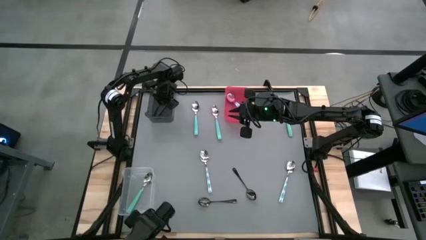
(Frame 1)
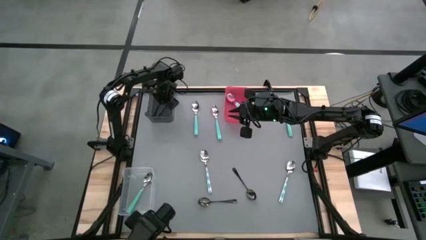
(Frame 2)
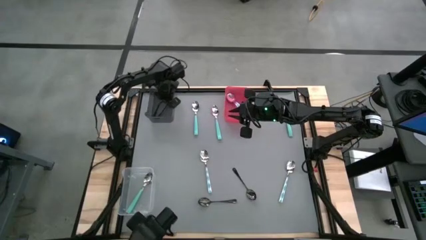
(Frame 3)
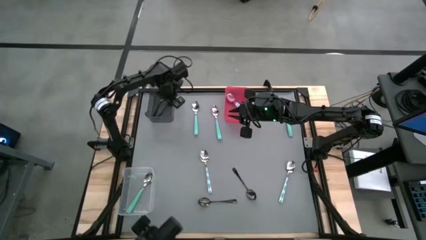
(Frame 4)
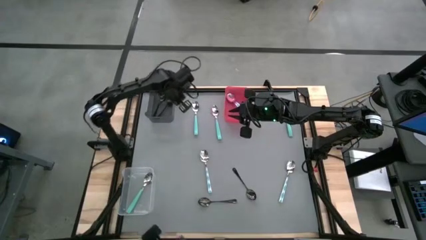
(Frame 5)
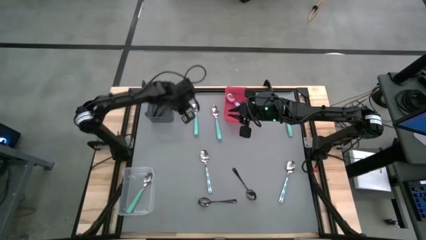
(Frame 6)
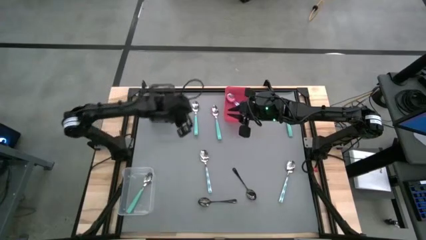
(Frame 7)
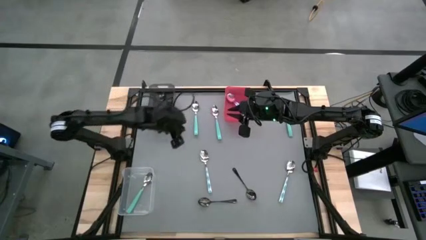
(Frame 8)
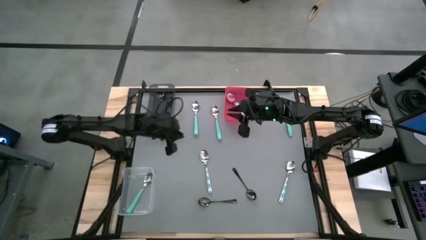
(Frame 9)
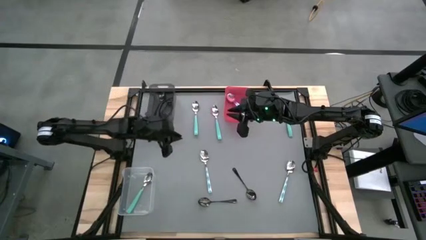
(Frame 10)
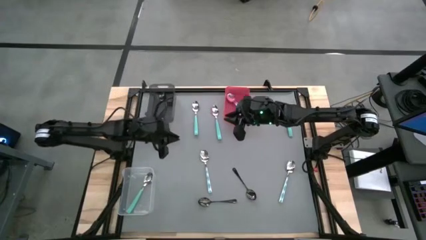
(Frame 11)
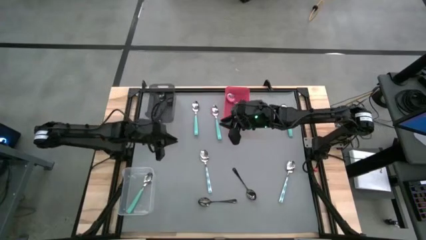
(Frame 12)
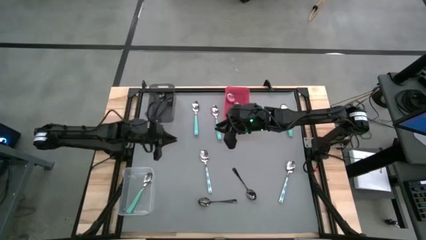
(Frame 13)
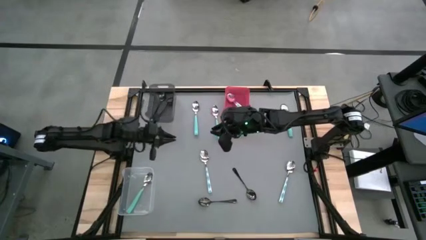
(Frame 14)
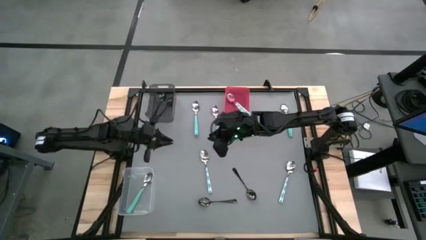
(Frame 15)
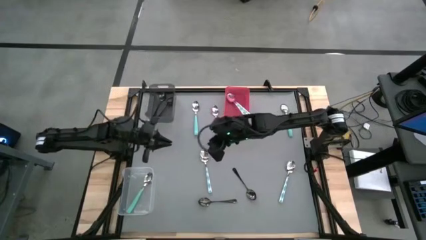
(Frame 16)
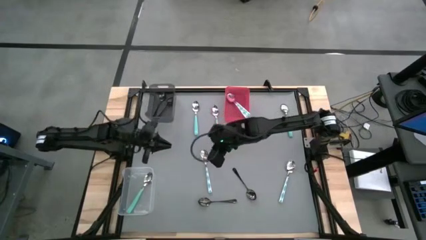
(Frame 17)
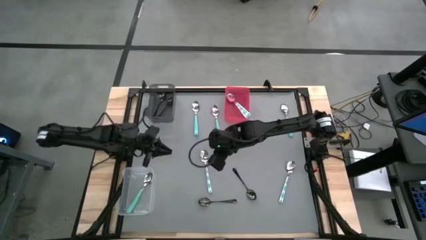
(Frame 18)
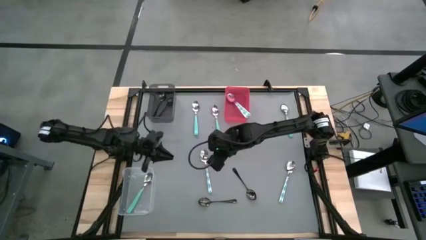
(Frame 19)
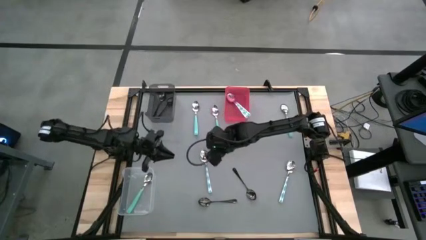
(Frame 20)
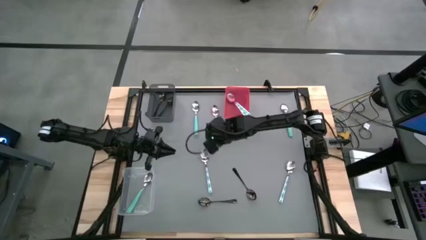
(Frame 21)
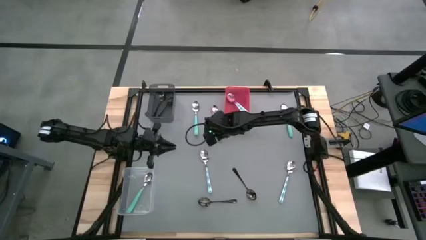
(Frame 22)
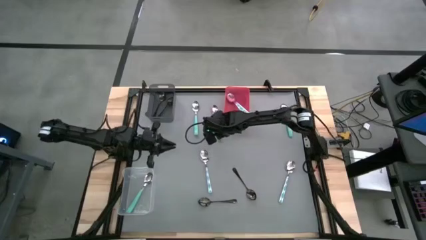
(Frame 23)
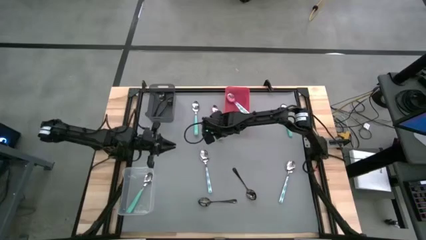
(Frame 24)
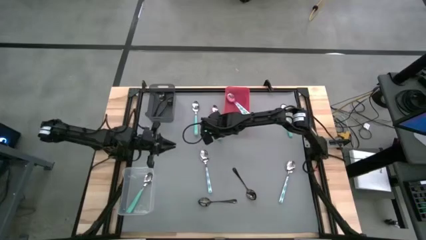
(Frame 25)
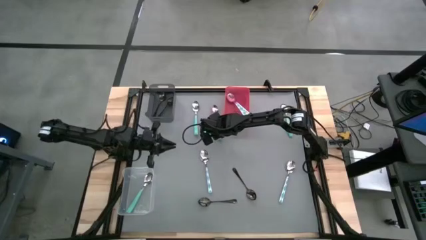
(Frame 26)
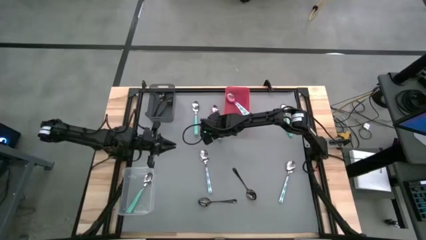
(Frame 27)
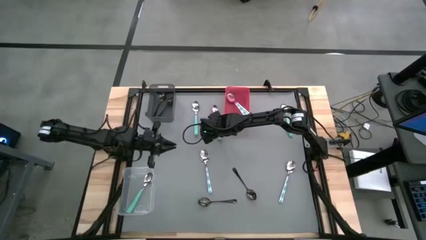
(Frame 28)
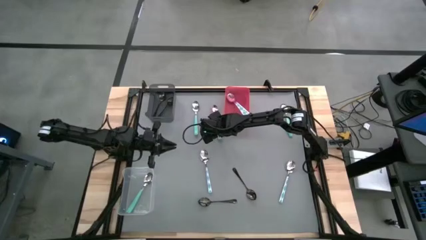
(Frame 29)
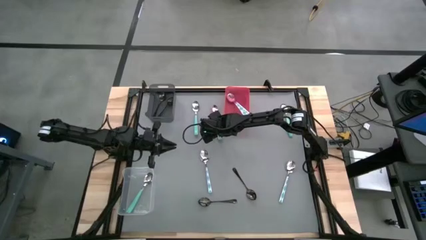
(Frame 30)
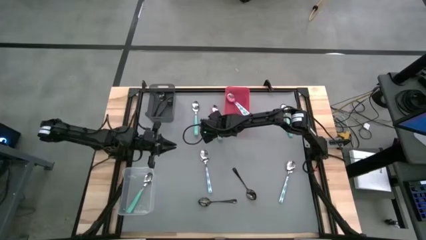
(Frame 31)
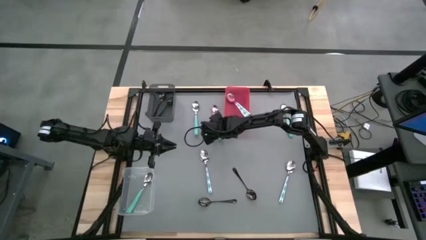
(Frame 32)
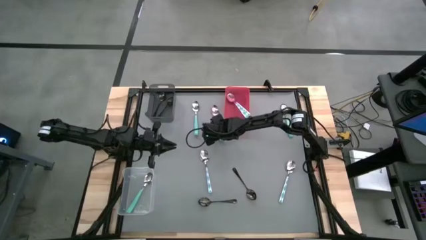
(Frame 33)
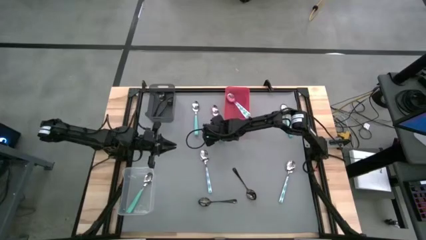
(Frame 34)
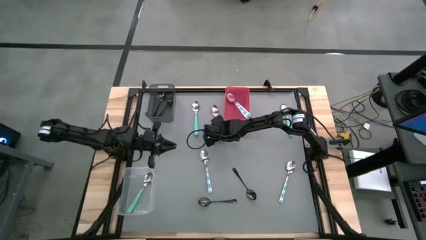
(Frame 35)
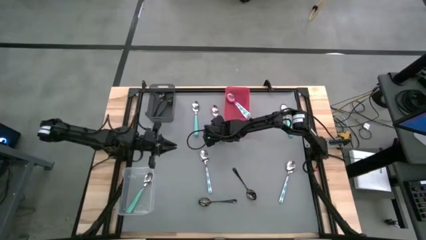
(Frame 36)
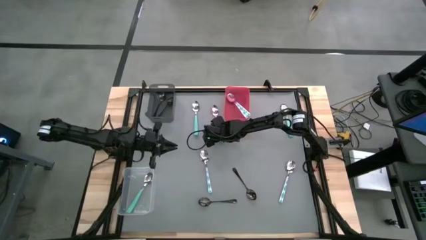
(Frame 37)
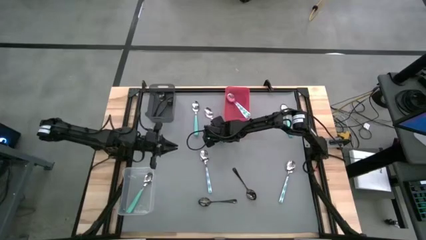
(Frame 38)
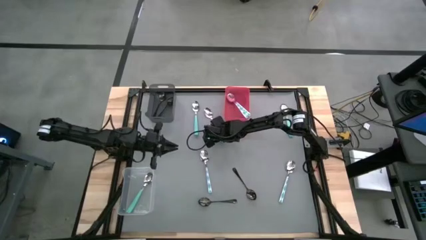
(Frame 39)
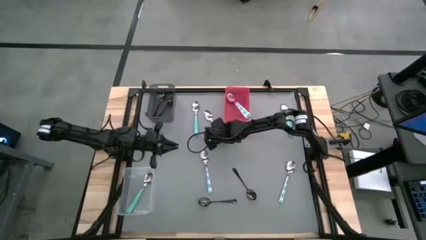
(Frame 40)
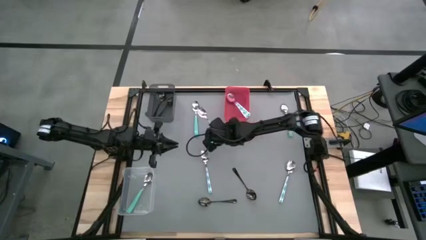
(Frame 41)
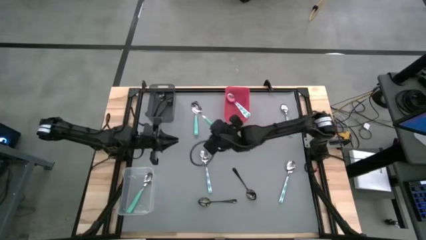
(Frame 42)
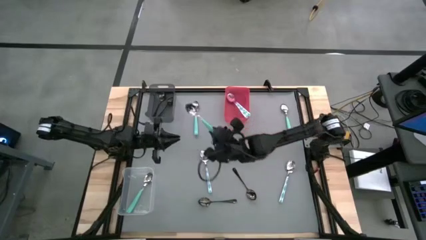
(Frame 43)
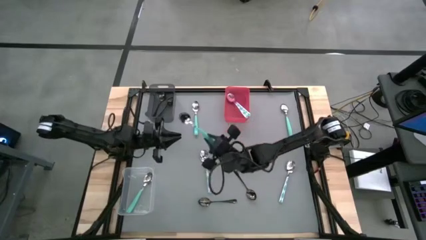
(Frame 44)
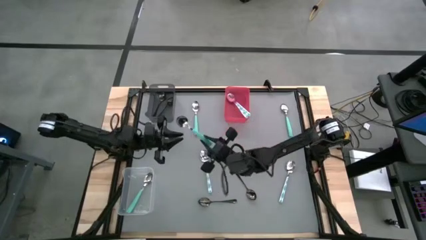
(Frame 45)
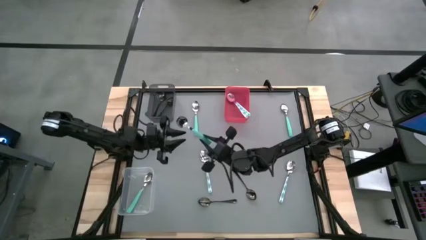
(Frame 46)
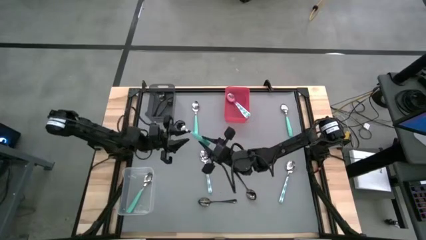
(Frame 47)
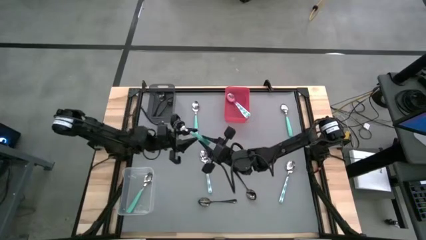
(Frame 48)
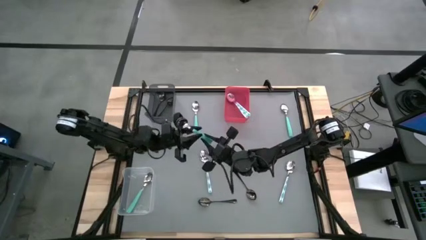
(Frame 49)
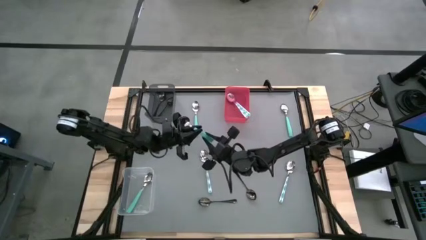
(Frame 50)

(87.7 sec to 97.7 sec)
Task: Sort silverware by color (type)
Put the green spoon into the transparent bin

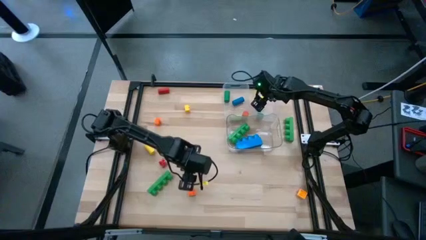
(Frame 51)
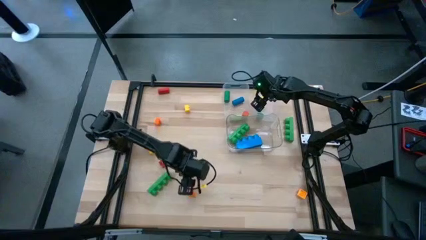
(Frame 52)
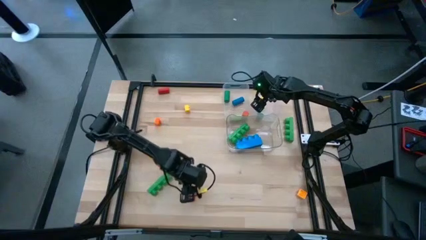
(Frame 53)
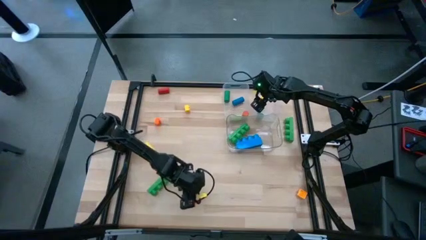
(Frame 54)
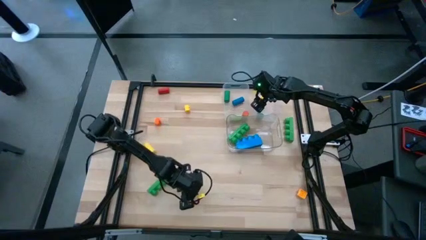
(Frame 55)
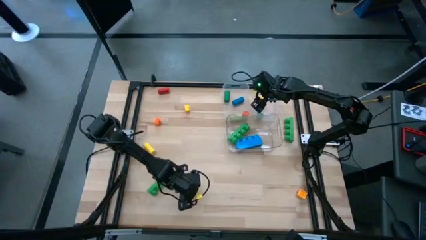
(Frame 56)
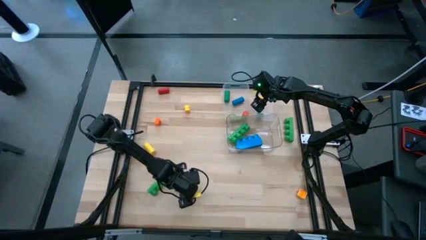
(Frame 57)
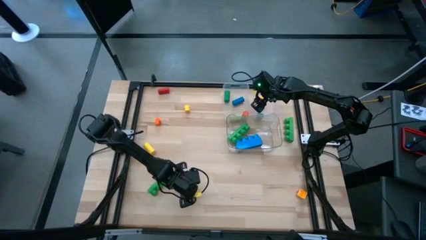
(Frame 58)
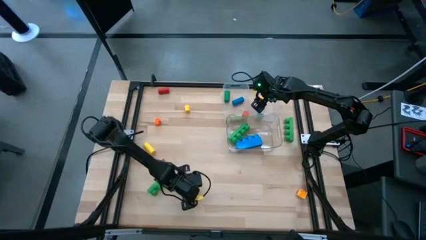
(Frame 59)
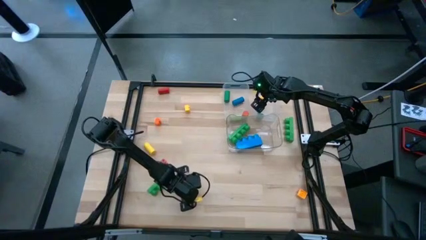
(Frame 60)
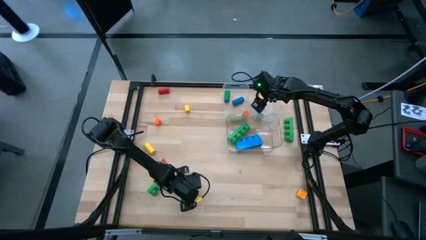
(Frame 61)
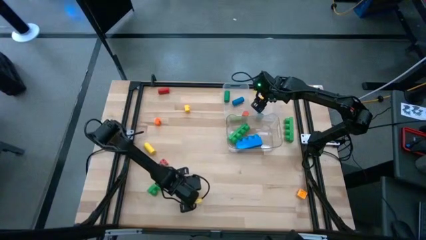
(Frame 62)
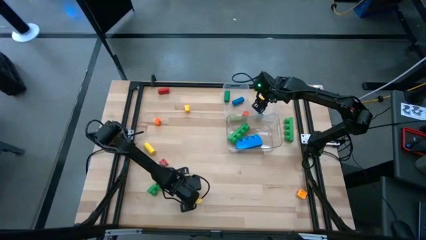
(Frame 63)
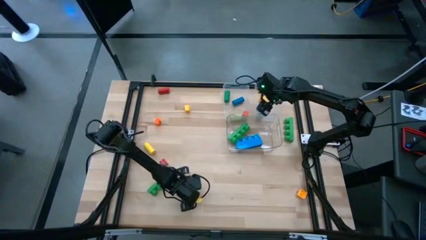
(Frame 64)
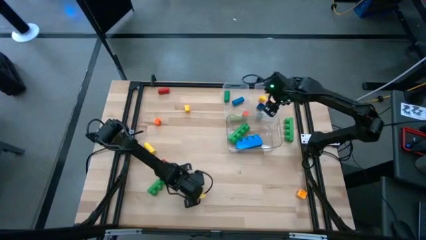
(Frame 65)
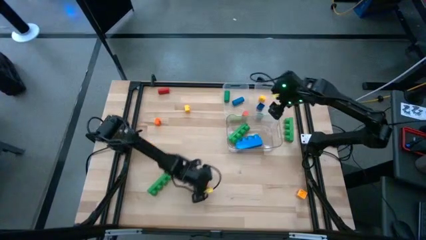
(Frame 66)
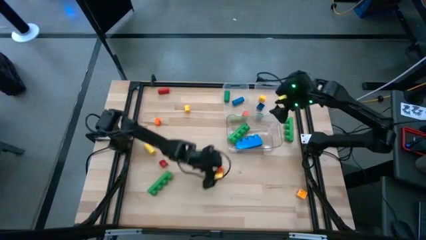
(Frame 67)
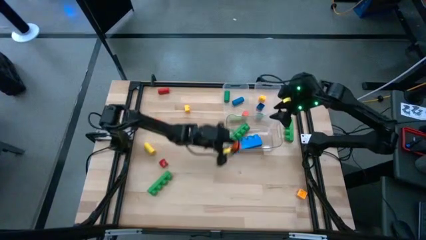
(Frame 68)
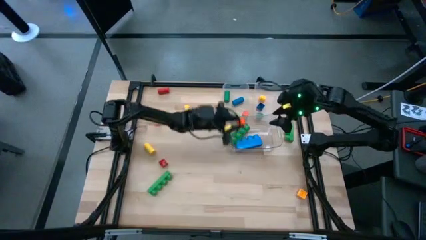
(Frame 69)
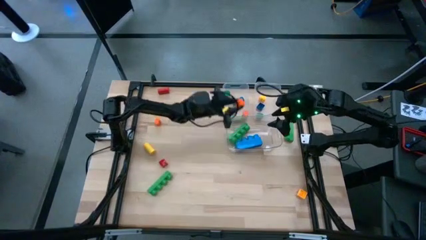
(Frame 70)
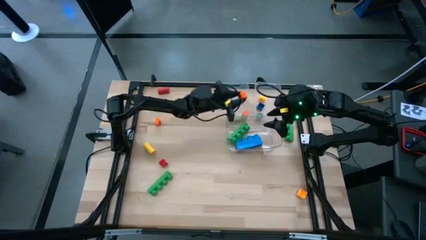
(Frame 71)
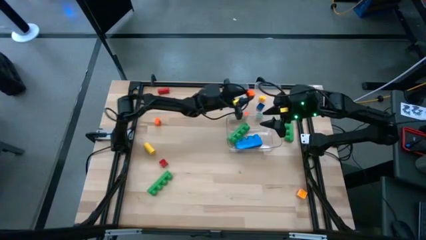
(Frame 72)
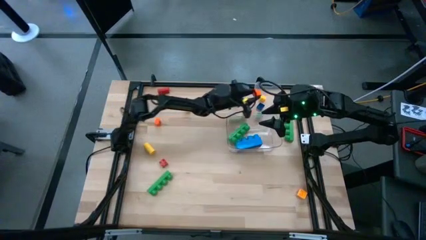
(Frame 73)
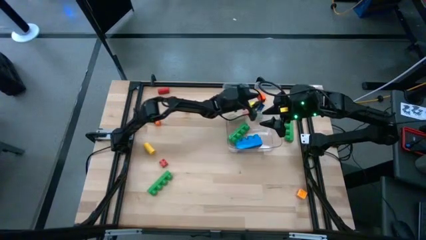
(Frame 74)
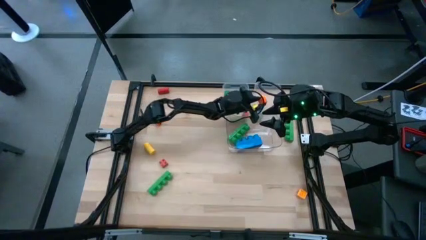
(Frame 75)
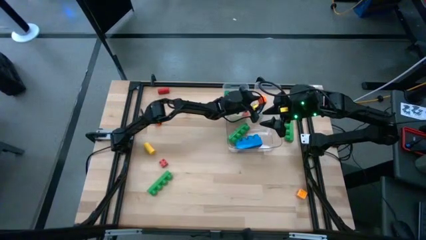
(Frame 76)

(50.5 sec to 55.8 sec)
Task: Sort blocks by size
Put the bottom small orange 4 stud game piece into the right transparent bin

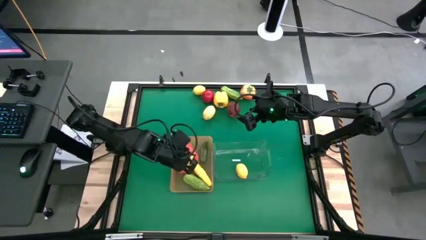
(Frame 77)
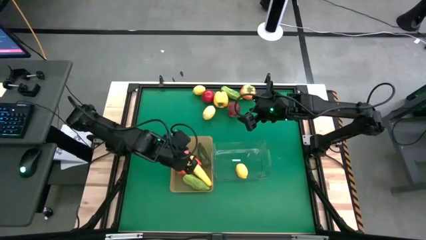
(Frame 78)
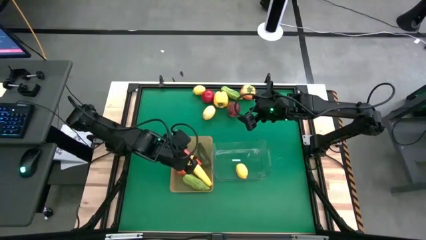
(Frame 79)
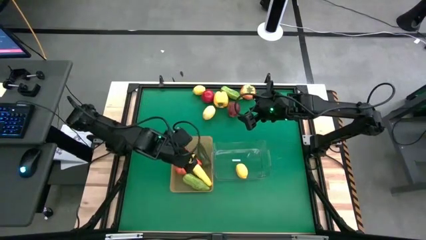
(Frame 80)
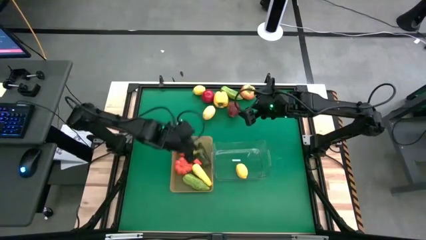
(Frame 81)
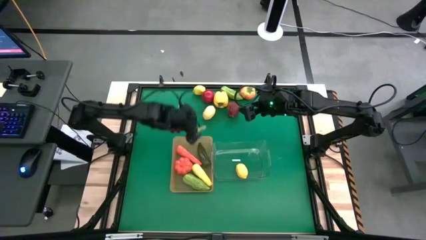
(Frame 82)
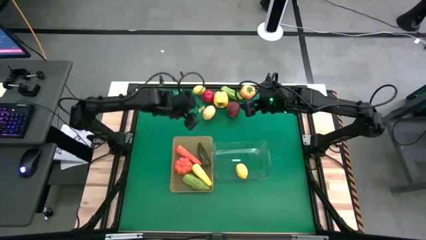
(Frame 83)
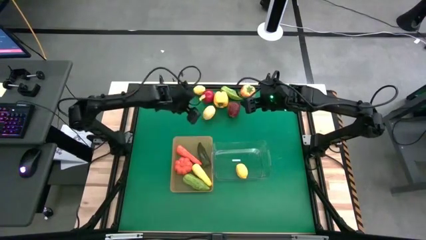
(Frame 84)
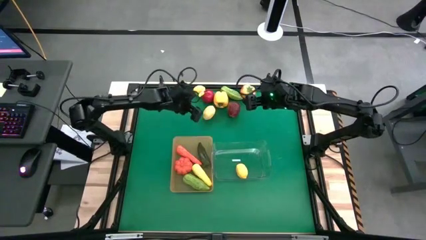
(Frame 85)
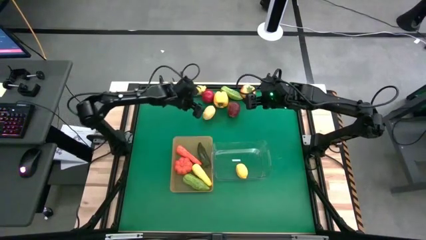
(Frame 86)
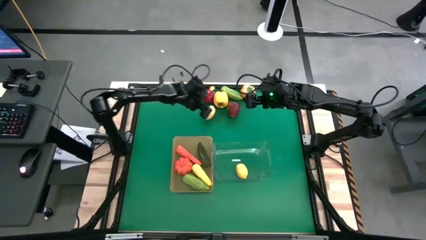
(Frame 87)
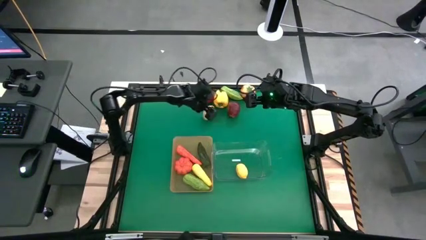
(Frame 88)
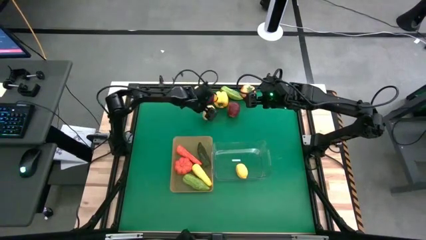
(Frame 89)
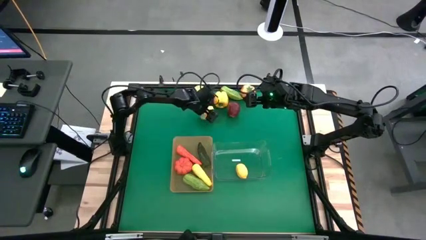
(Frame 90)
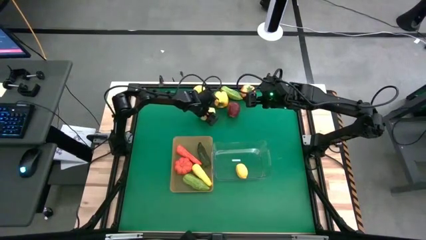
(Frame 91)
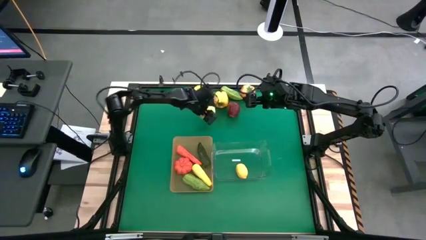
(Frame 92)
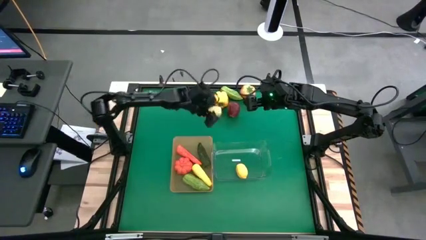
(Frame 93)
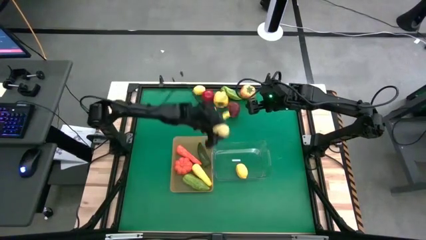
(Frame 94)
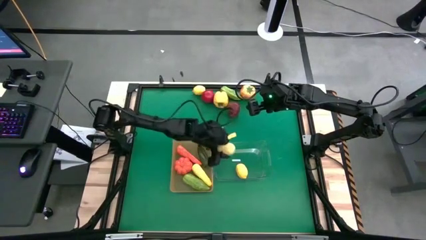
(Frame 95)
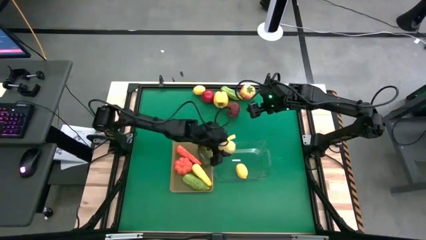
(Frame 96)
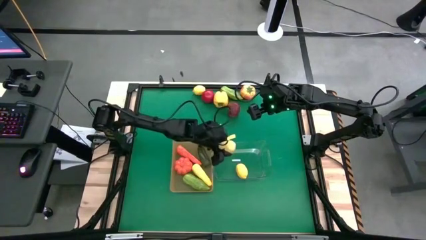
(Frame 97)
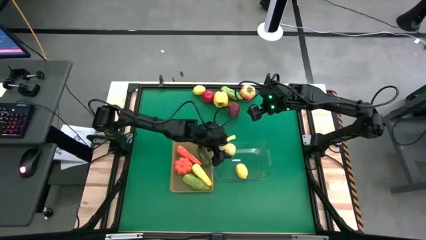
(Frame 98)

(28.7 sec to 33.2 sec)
Task: Sort produce into baskets
Put the bottom lemon into the transparent bin
